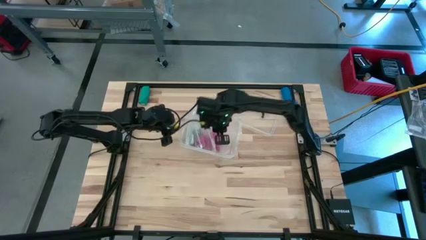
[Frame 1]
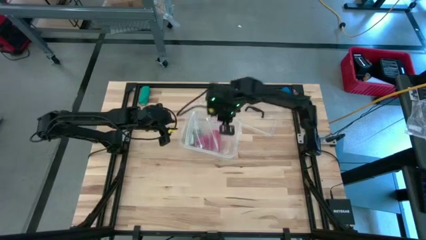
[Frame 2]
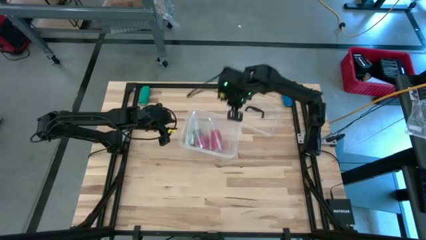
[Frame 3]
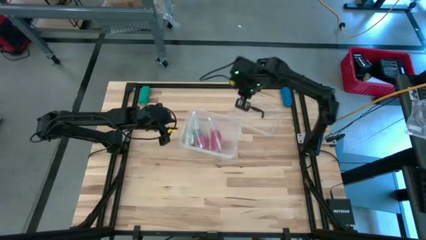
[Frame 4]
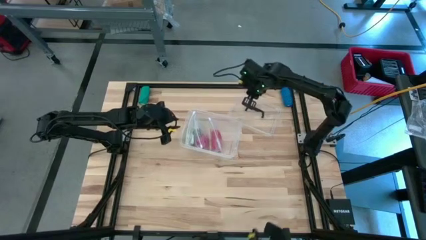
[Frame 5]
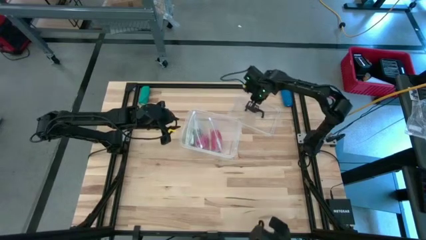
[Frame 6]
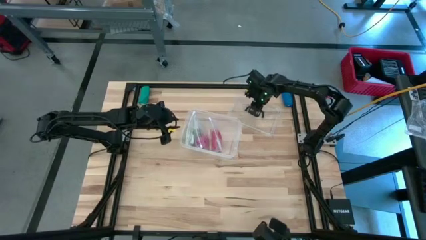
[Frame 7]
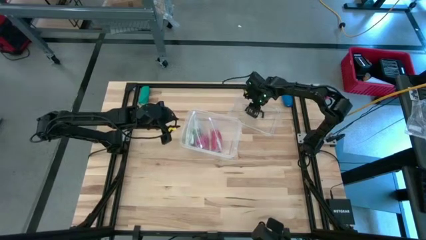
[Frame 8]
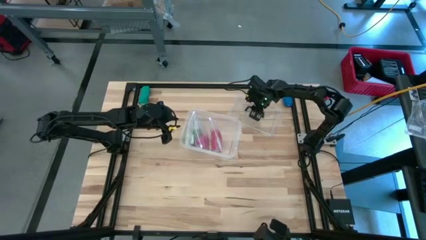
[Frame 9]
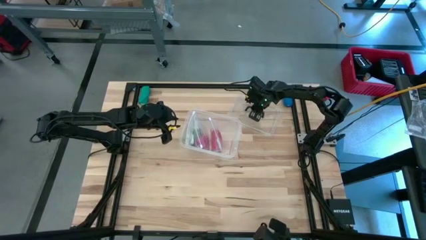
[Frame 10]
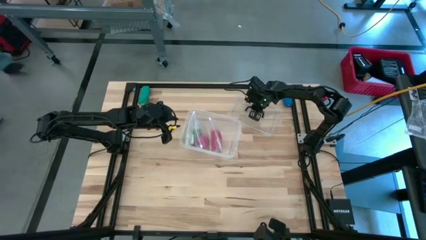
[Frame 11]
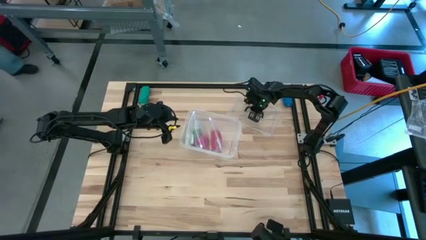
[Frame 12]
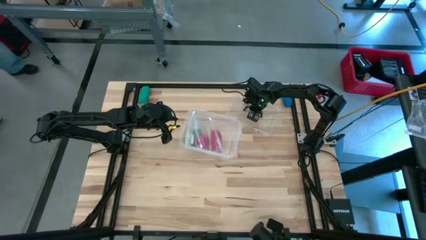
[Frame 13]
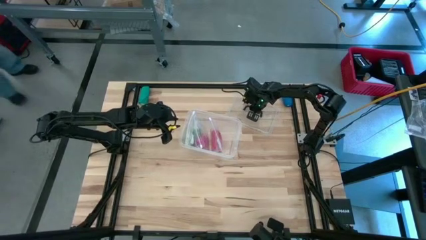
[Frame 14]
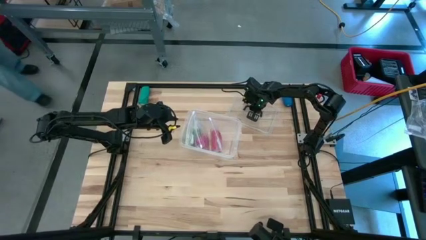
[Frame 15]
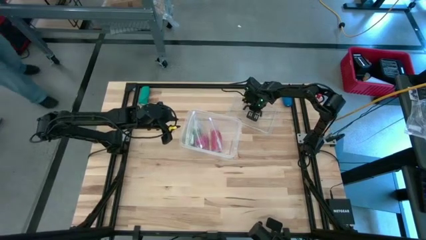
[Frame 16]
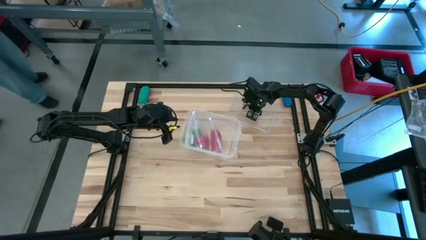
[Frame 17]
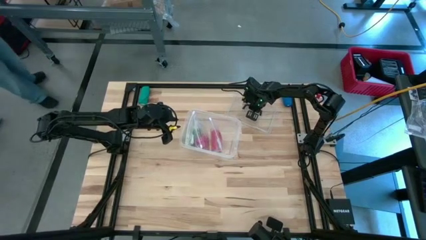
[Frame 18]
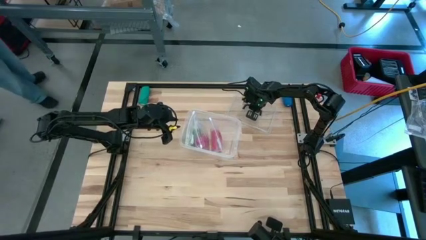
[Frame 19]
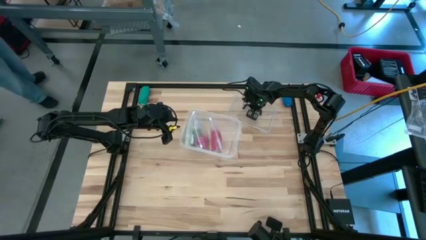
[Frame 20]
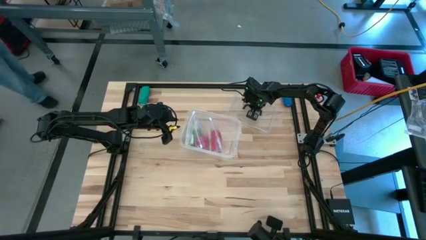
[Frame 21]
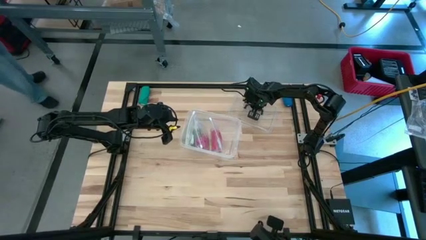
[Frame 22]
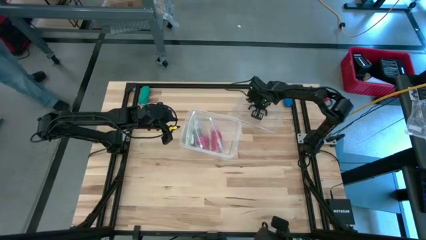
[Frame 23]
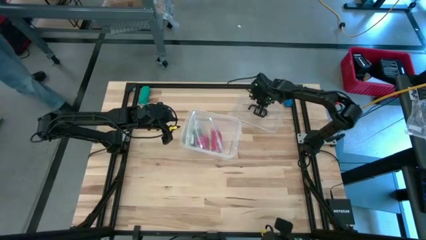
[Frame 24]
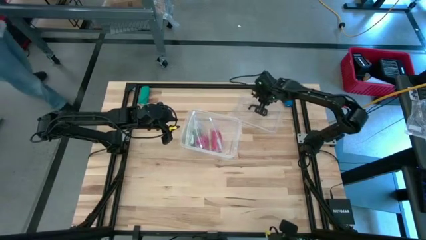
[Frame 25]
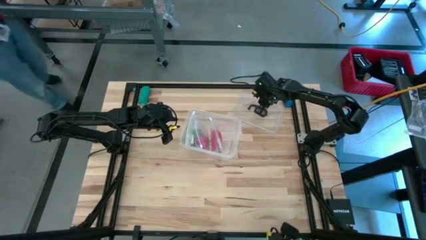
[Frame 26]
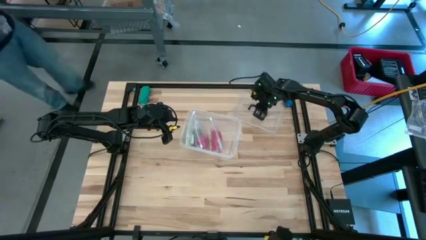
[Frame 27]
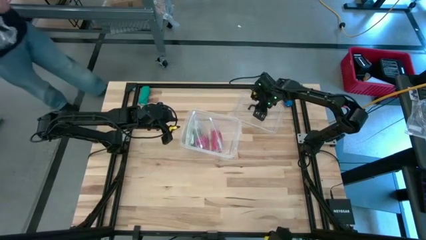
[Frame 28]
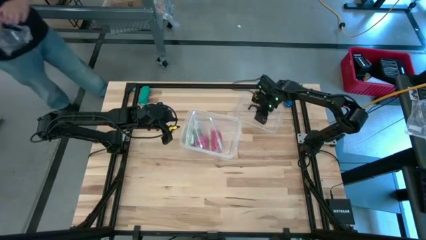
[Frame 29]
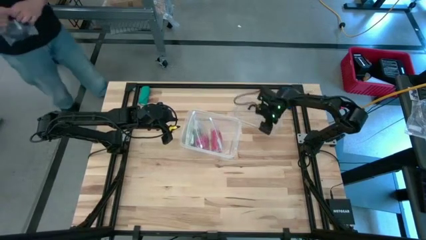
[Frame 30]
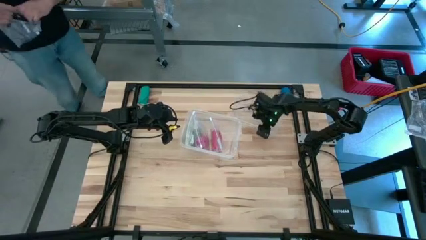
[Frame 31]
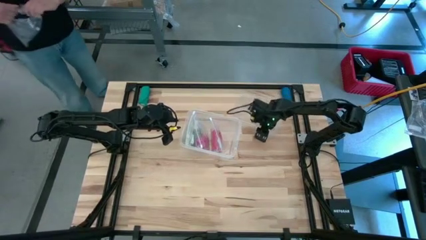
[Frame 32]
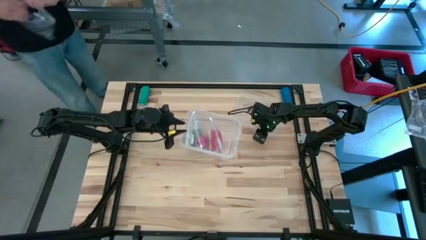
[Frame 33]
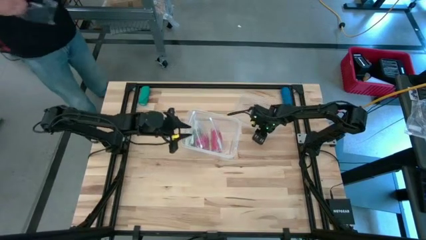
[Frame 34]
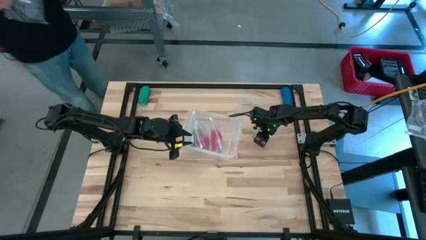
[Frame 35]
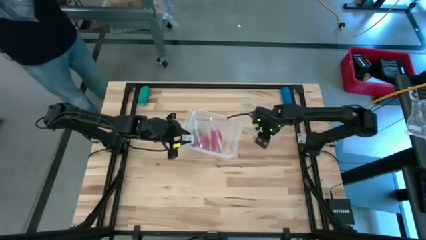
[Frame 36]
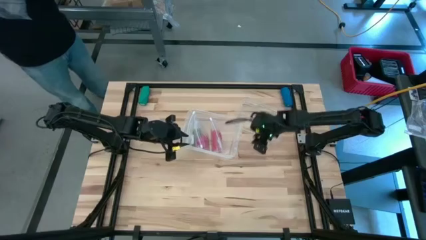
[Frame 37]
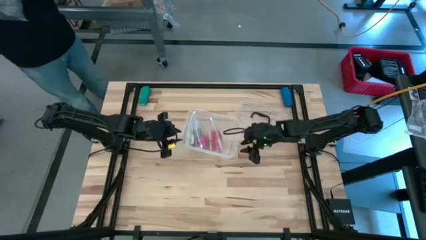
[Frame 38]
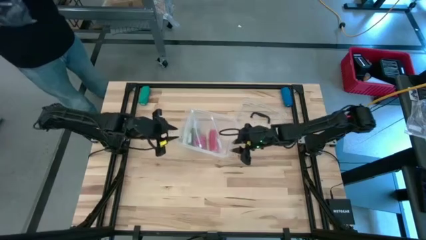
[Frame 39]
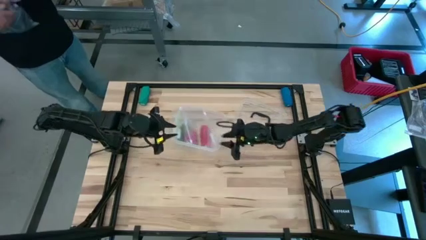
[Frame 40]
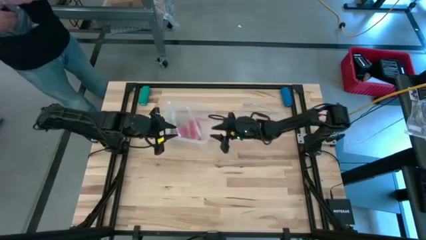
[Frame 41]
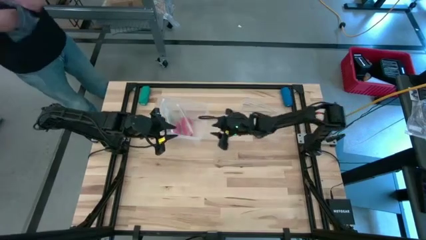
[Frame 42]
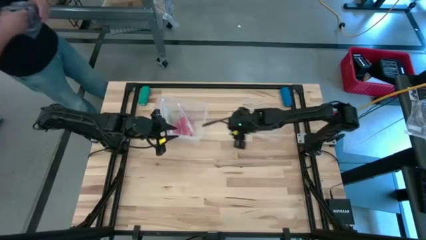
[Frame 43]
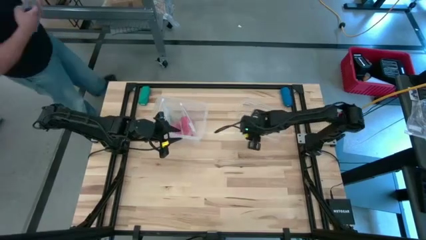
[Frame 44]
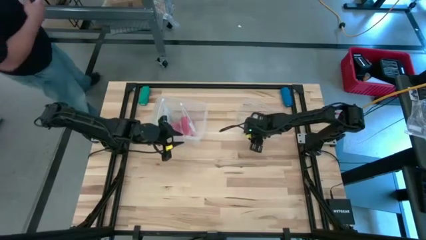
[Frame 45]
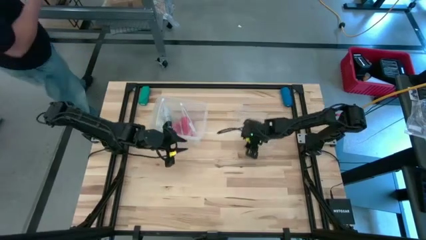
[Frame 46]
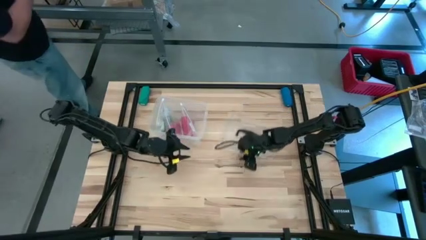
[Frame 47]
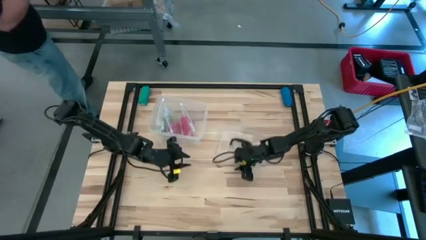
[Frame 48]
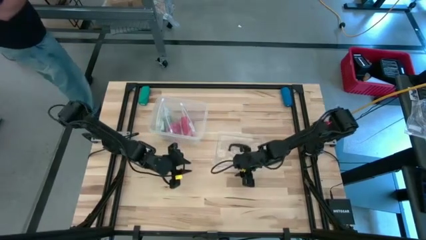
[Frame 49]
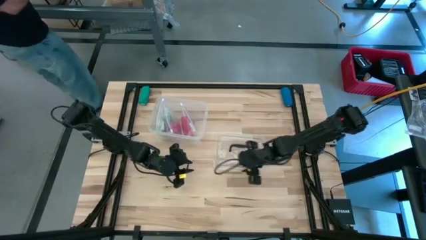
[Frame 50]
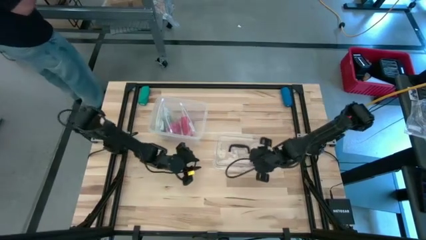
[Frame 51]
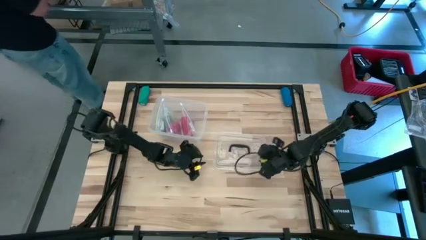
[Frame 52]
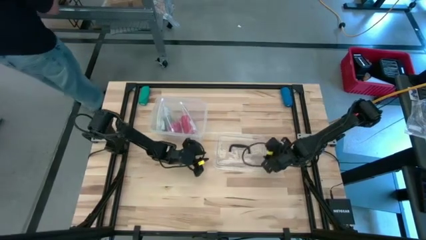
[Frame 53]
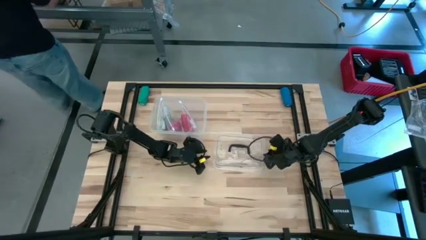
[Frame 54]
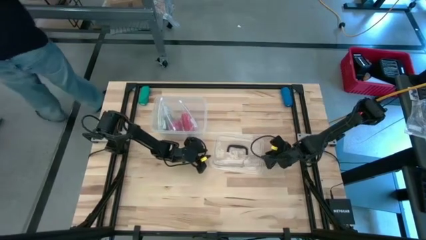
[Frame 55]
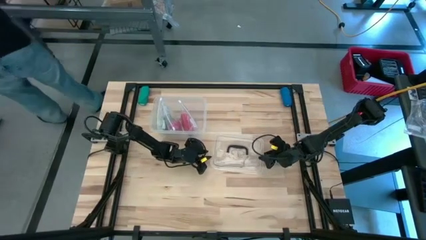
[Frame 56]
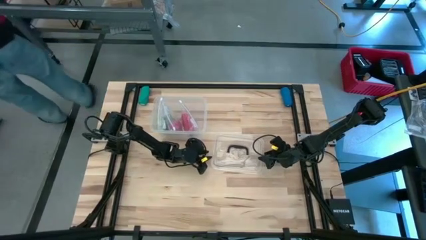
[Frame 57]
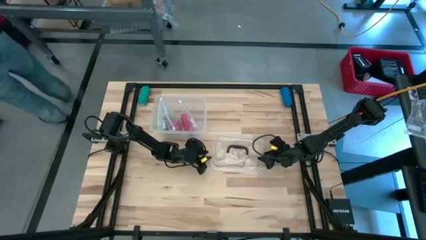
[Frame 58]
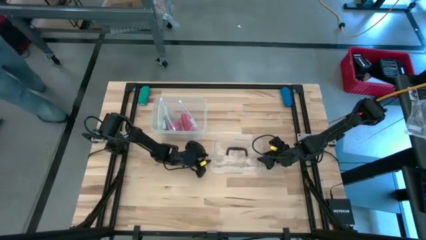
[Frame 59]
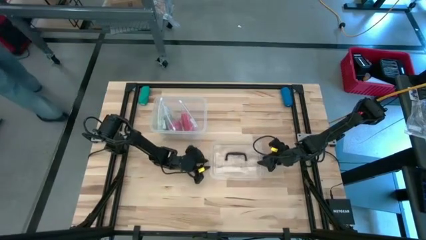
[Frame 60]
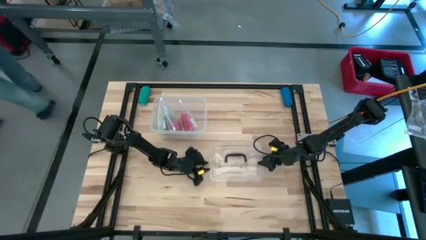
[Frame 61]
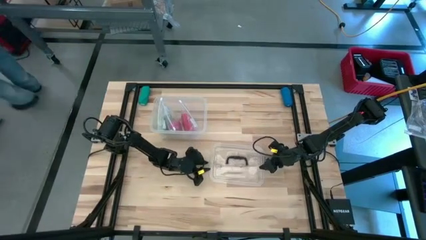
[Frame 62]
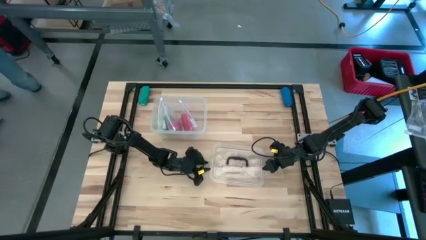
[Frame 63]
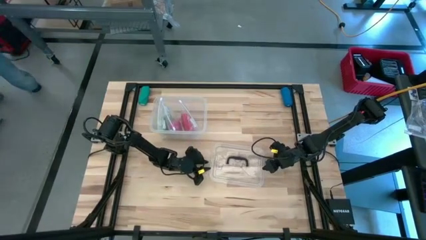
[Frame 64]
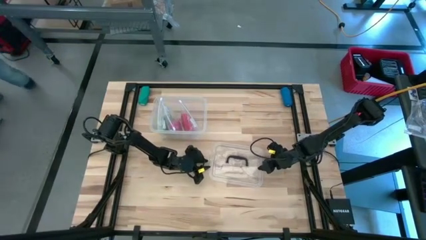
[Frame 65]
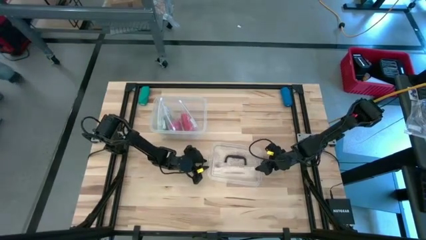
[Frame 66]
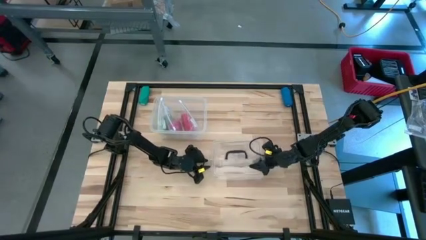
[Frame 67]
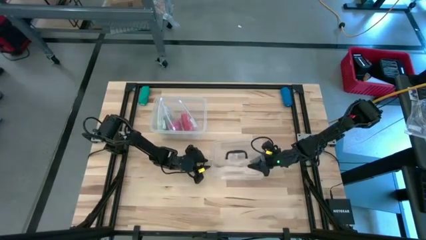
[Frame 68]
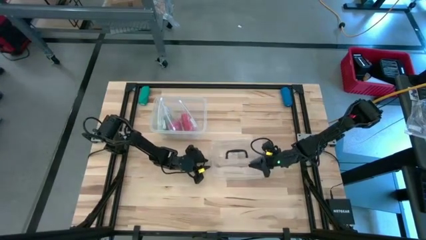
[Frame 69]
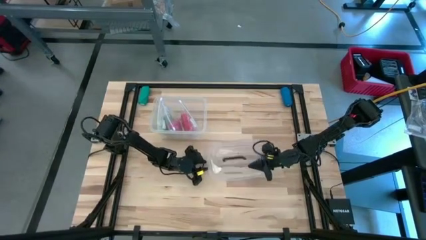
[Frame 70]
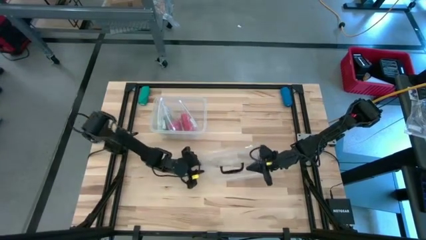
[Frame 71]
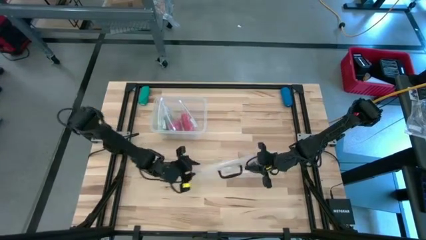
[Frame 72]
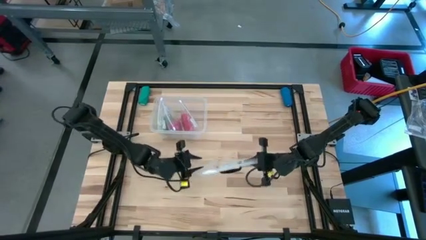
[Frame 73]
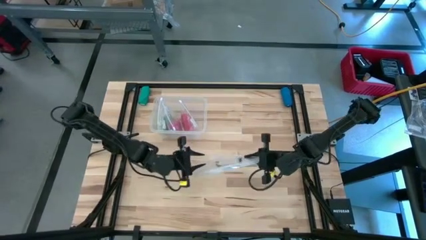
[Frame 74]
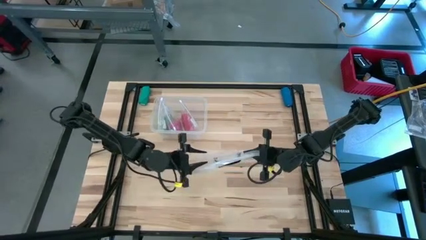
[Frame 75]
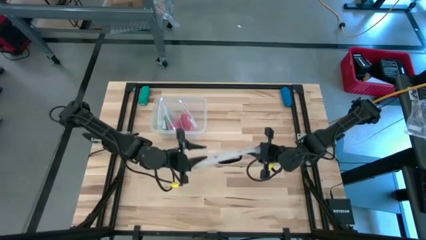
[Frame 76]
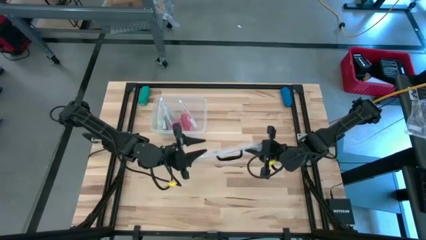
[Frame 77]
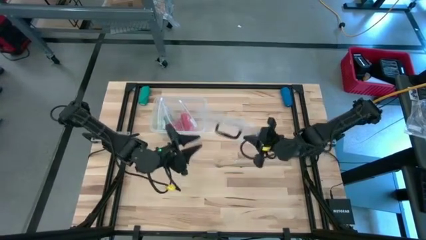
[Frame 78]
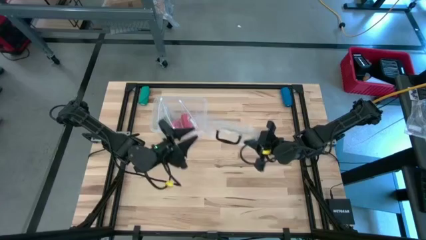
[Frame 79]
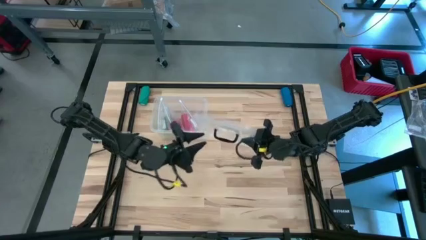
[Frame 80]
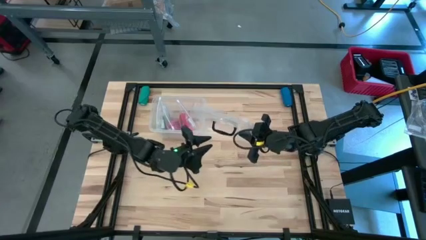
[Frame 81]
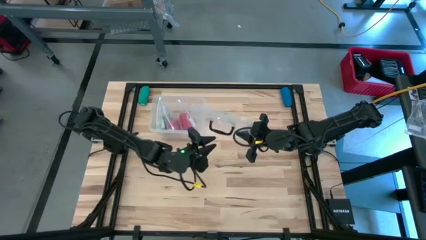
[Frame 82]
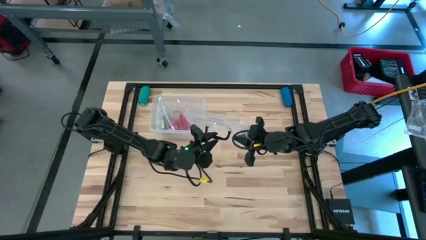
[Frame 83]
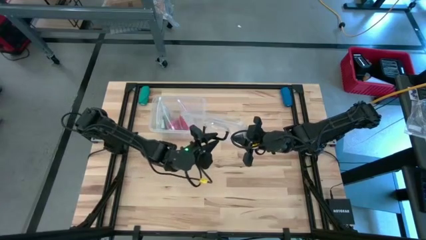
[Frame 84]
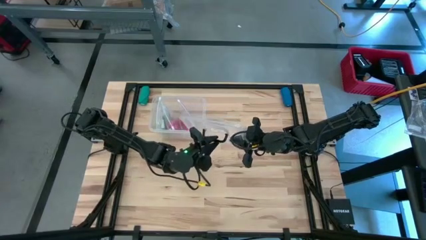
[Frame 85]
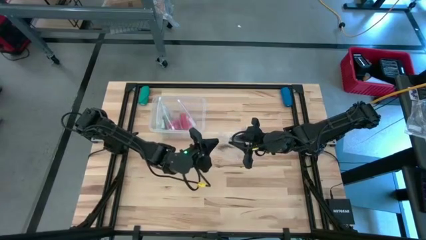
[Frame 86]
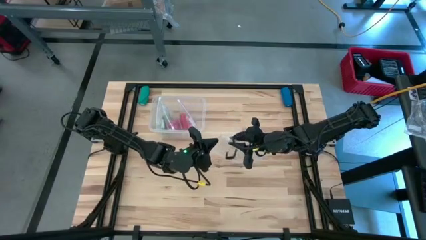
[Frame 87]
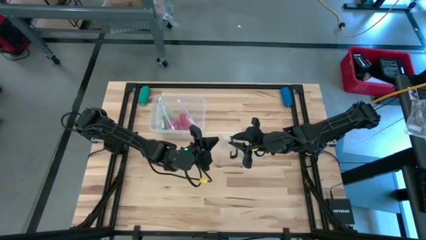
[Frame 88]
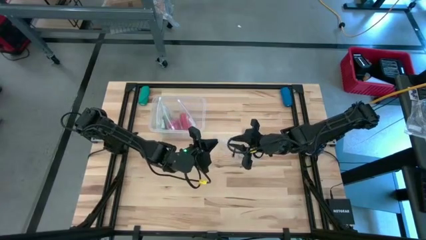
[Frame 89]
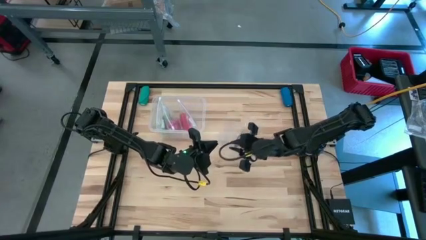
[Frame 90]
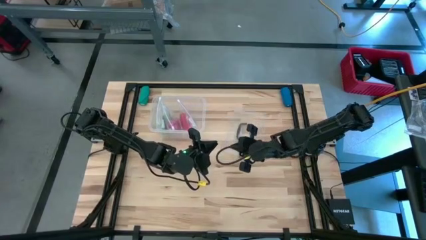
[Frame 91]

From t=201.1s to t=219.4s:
Task: Roll bandage
Close the transparent container
